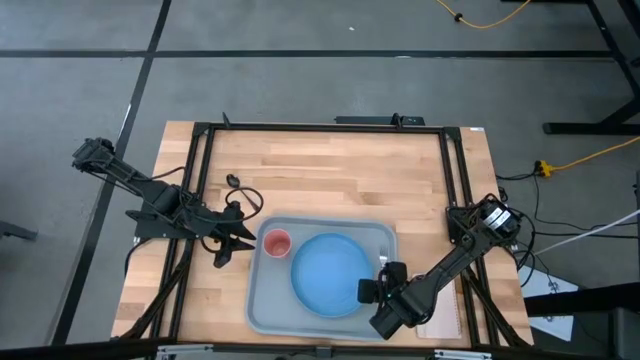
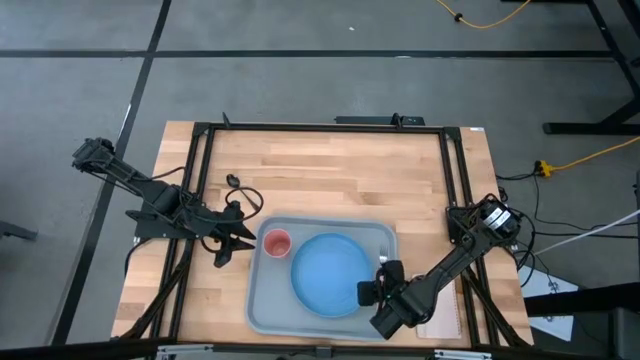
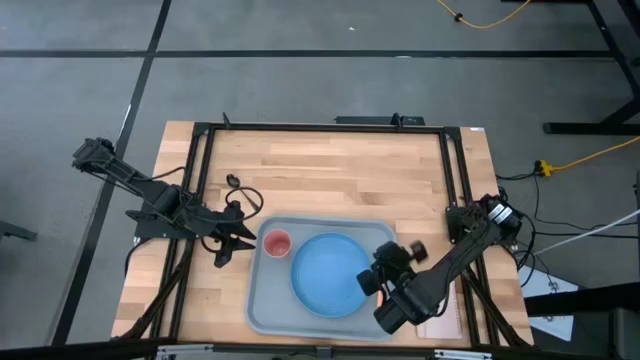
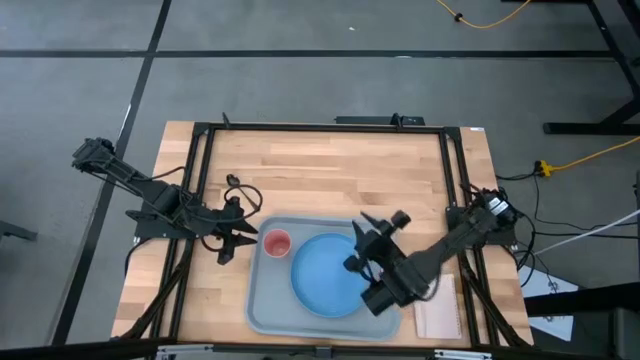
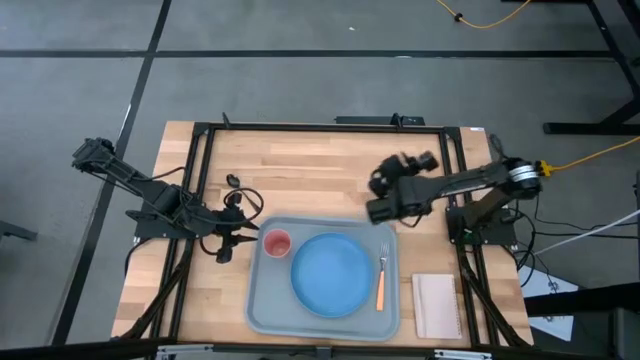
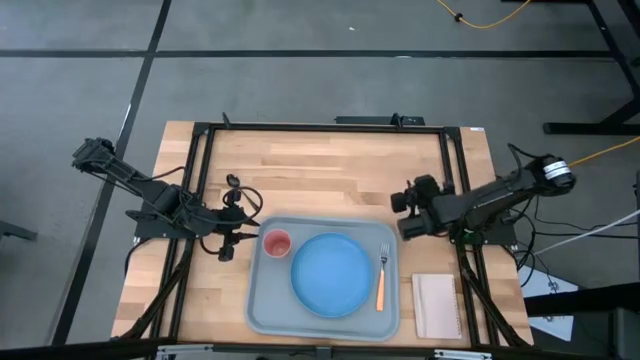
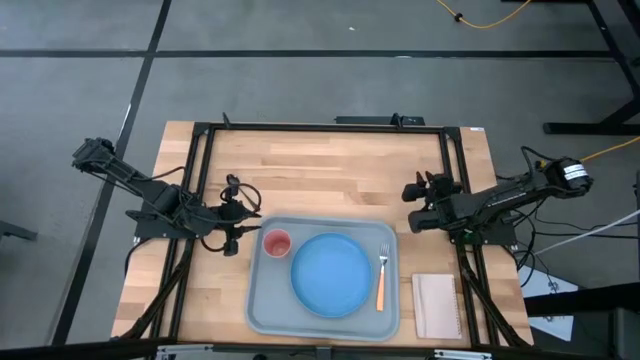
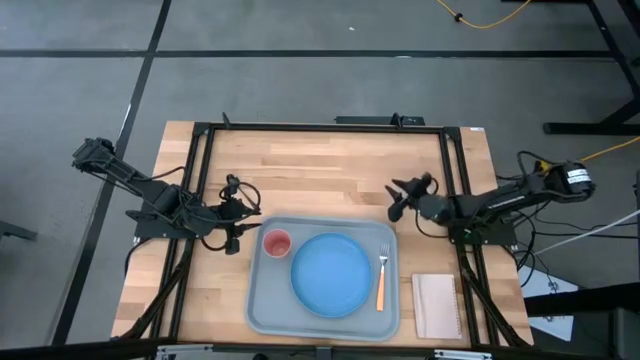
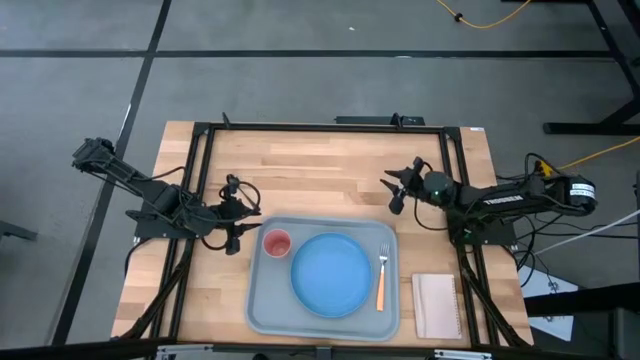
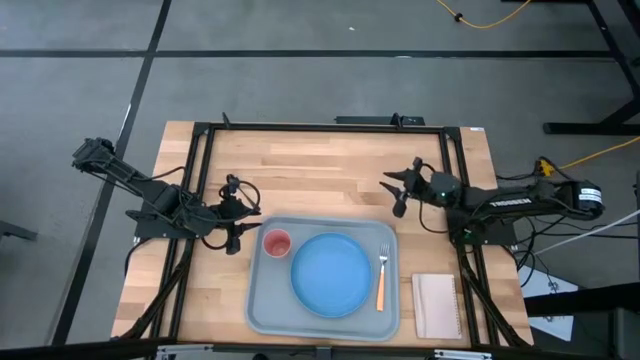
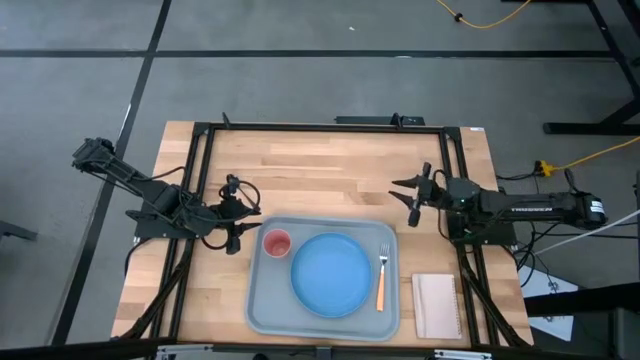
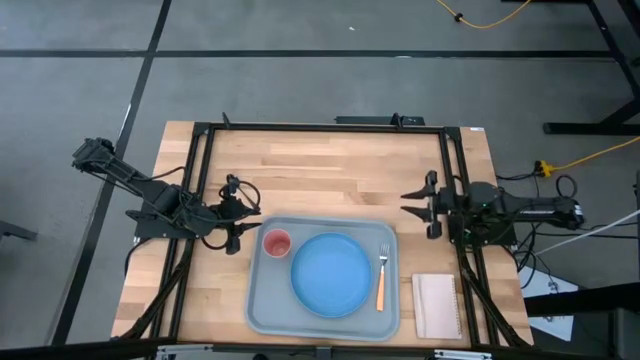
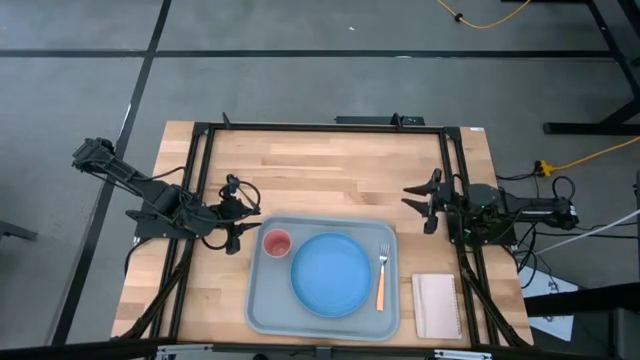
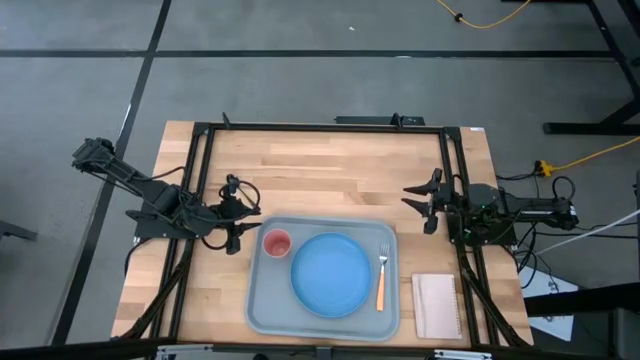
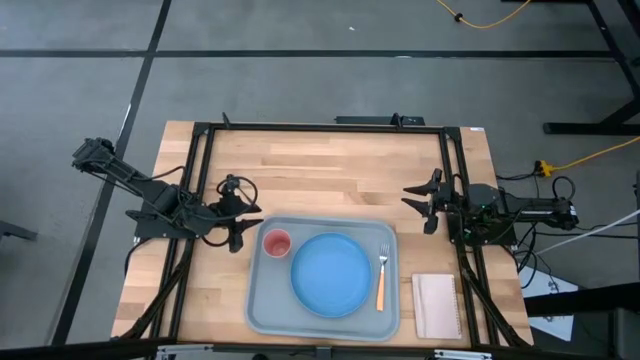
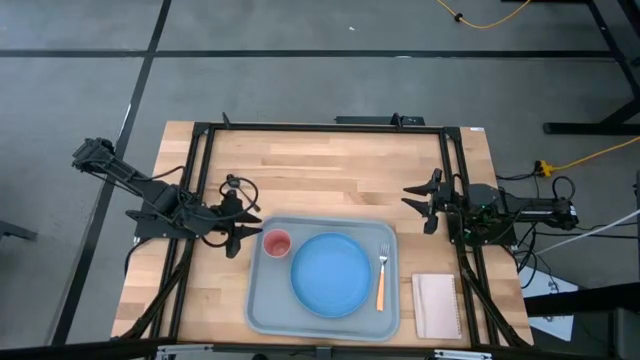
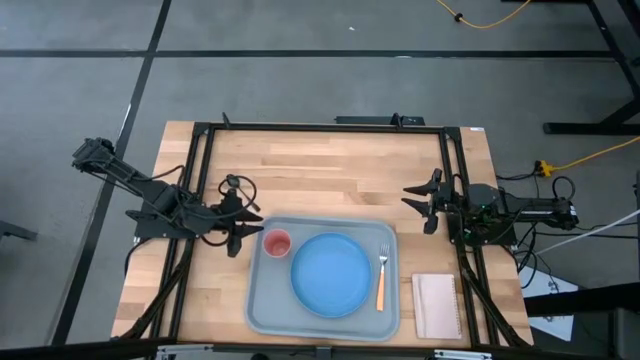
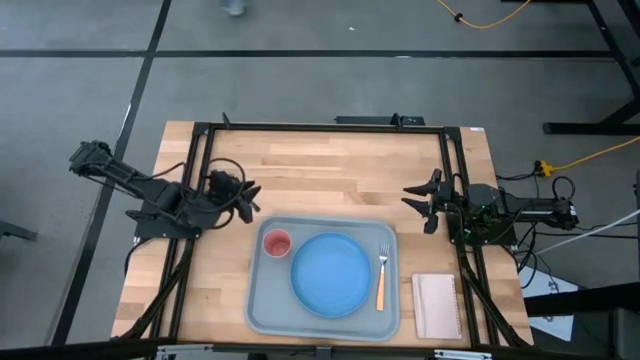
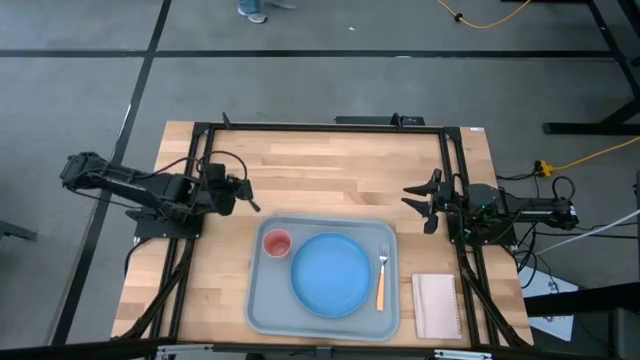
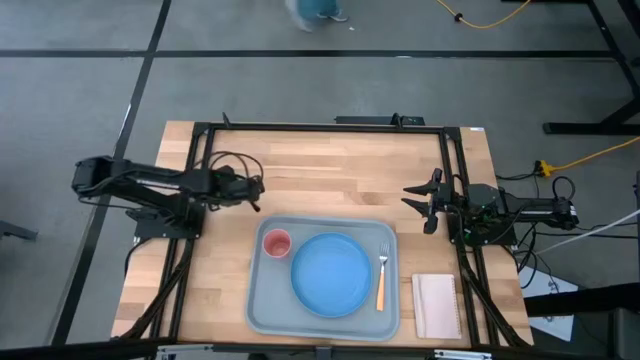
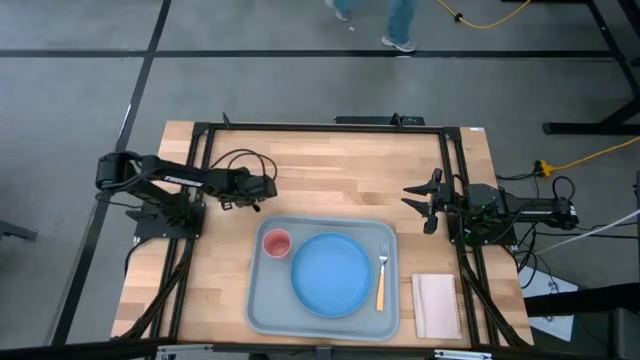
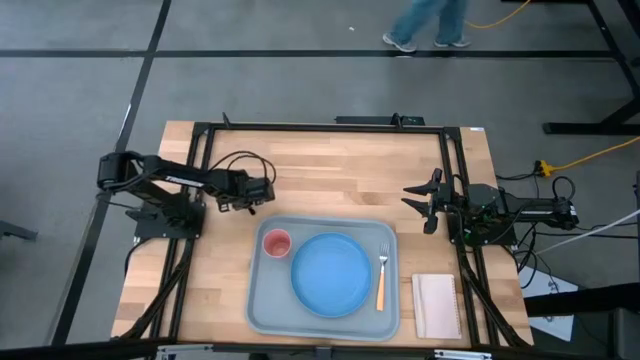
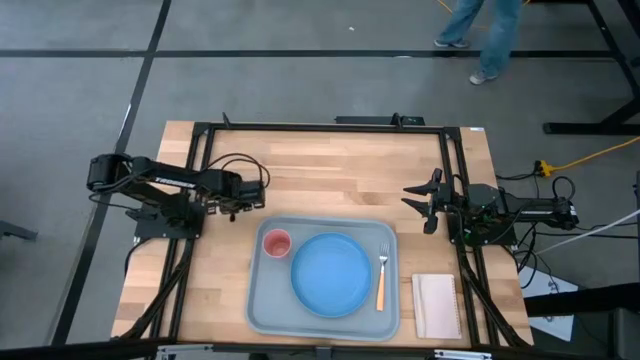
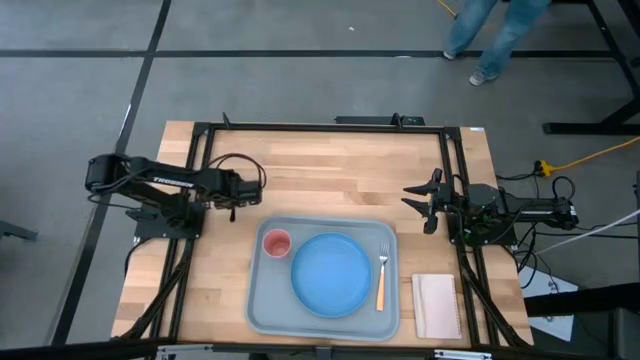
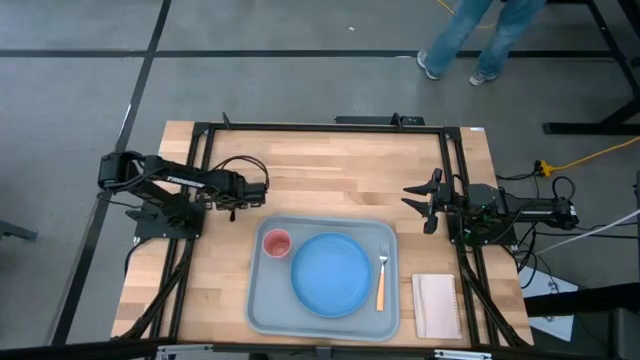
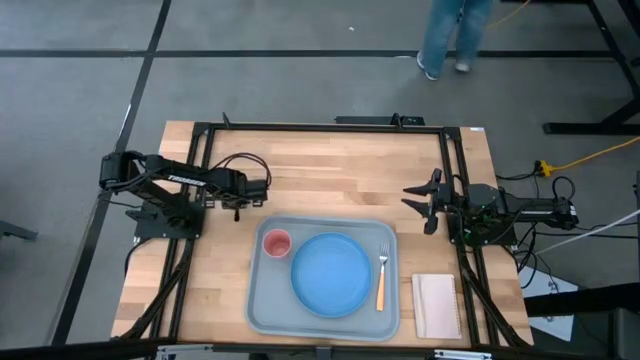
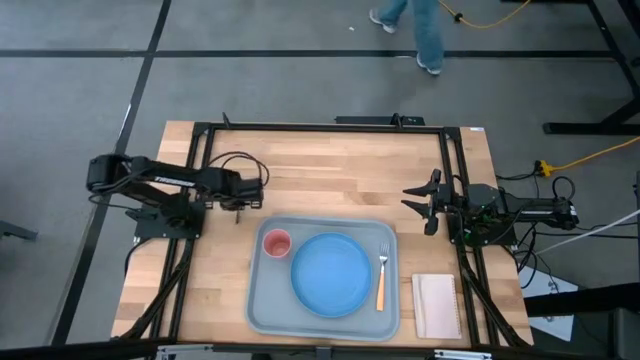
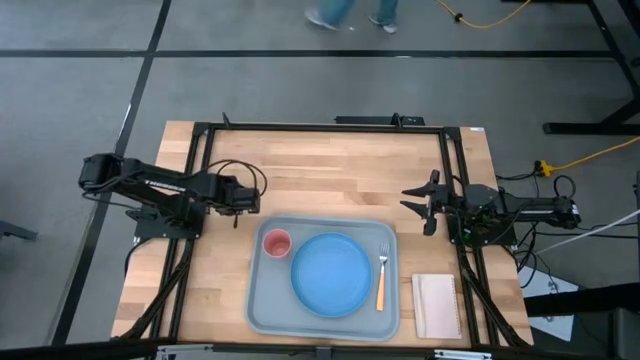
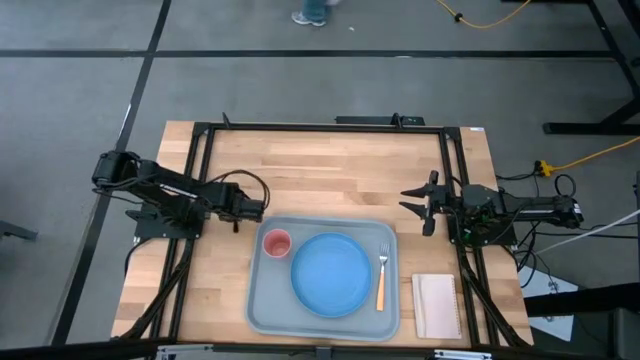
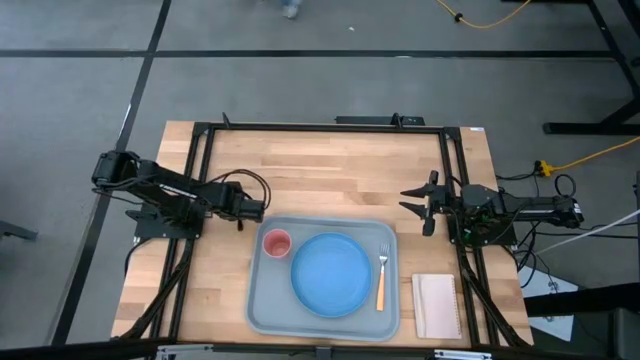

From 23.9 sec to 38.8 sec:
Task: Pick and place plate/cup/fork/spoon on tray
Put the black spoon on the gray tray on the left of the blue plate

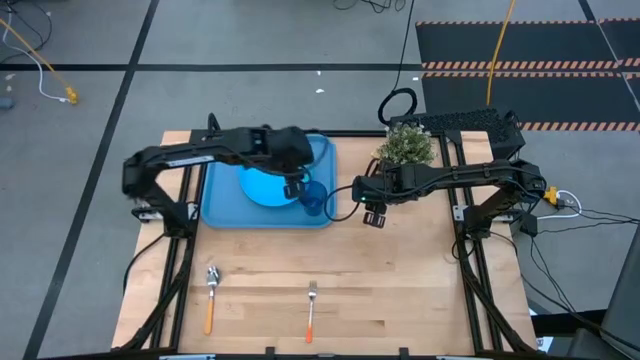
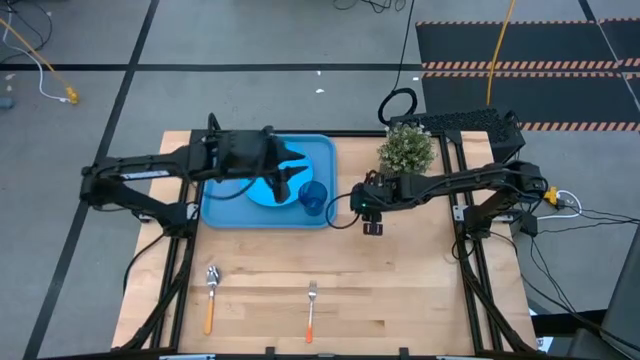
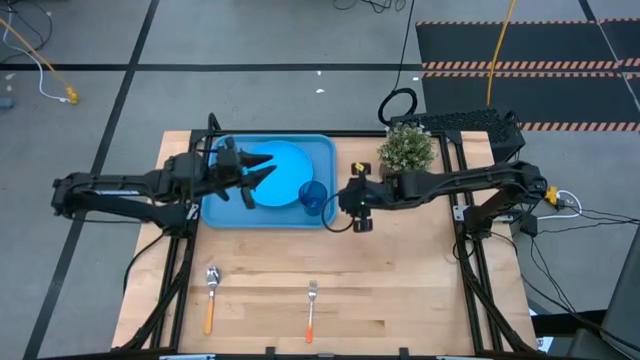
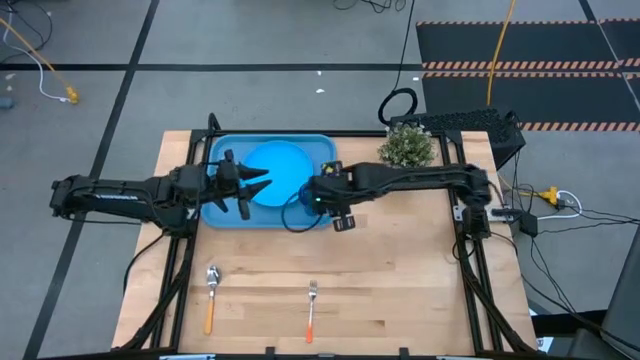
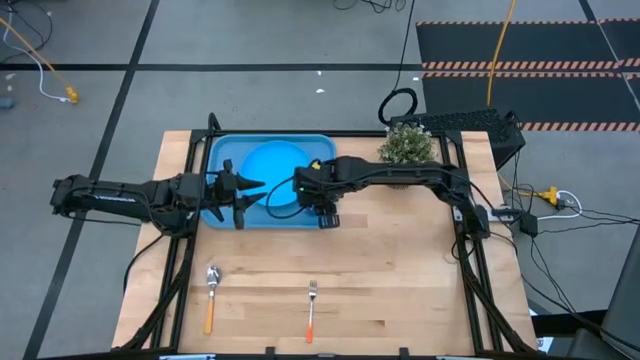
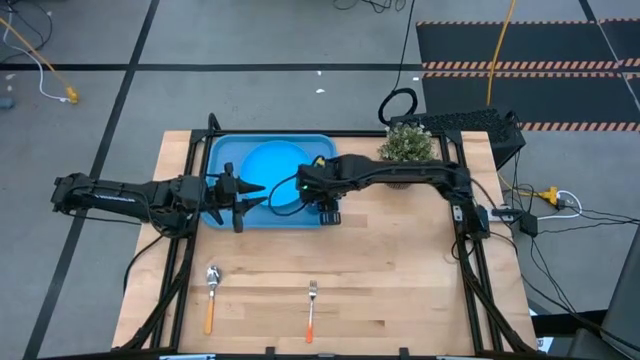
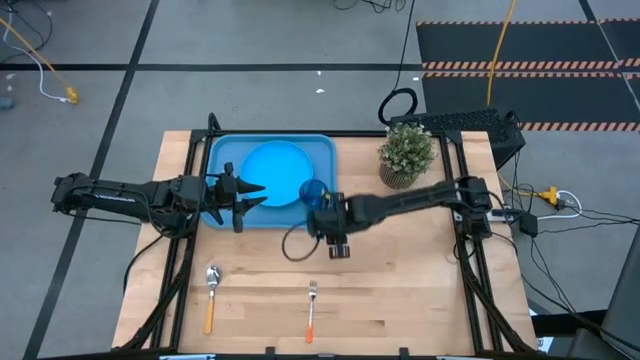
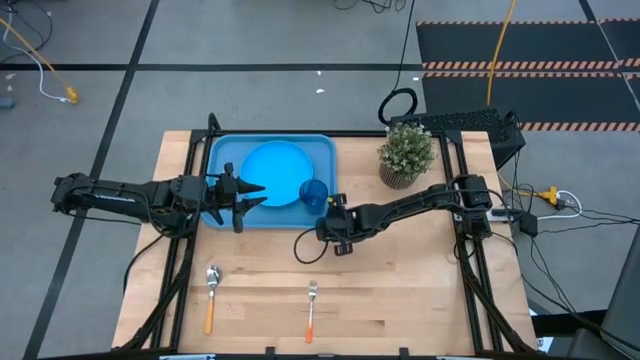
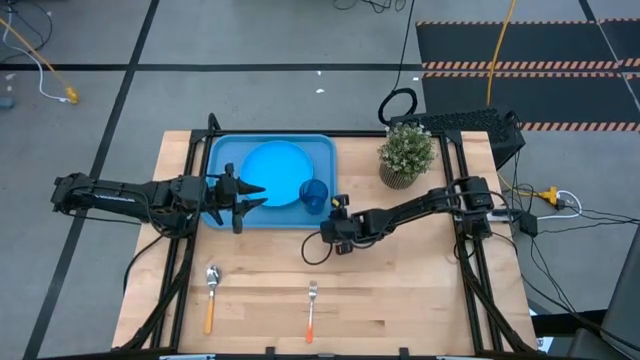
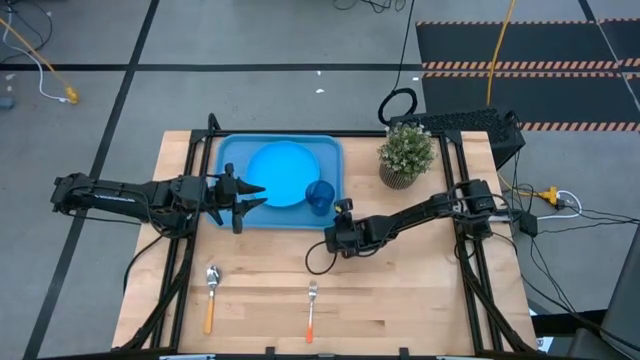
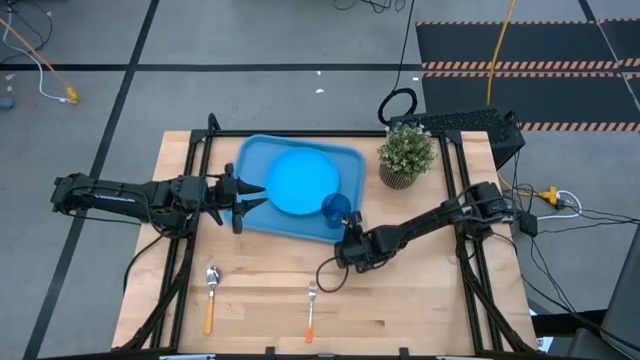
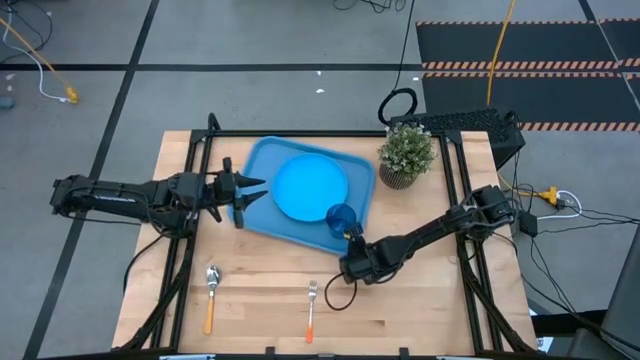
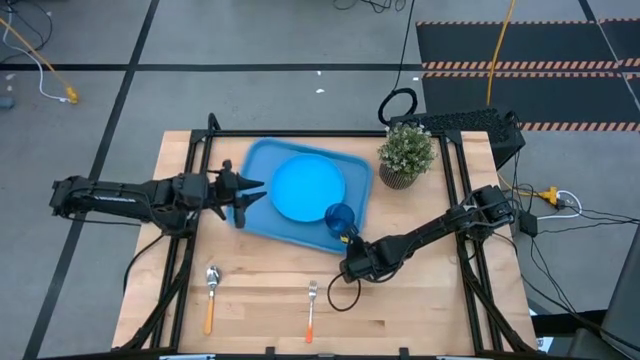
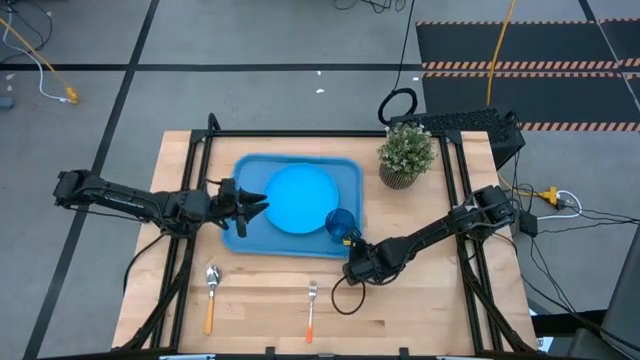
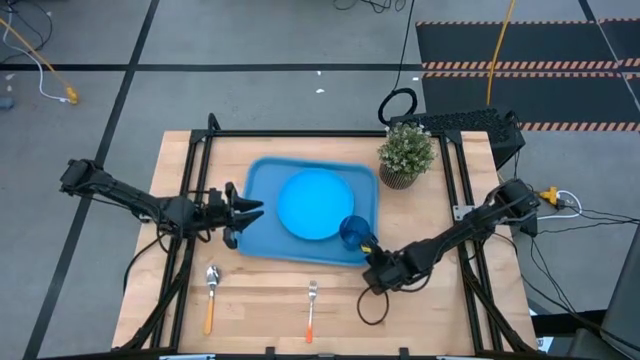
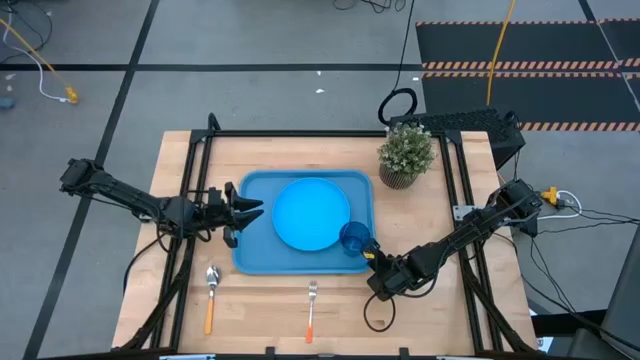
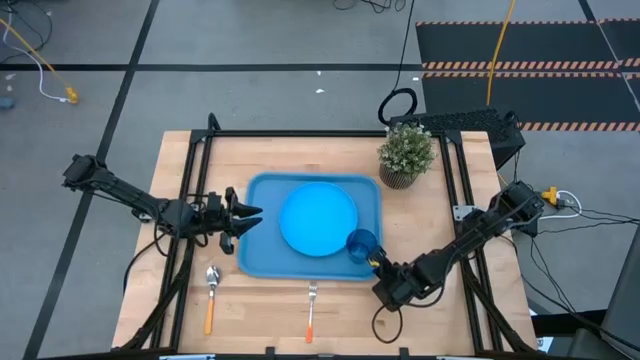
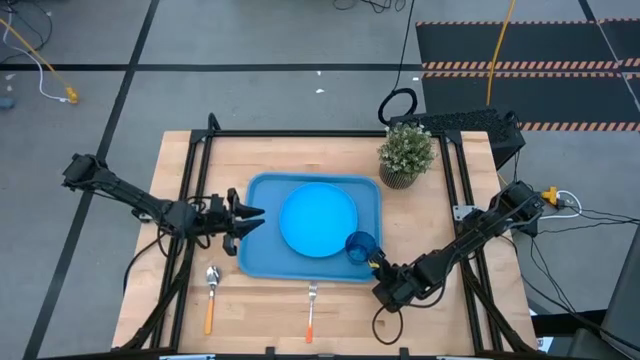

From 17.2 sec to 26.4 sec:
Task: Pick and place plate/cup/fork/spoon on tray
Move the blue tray to the center of the table
